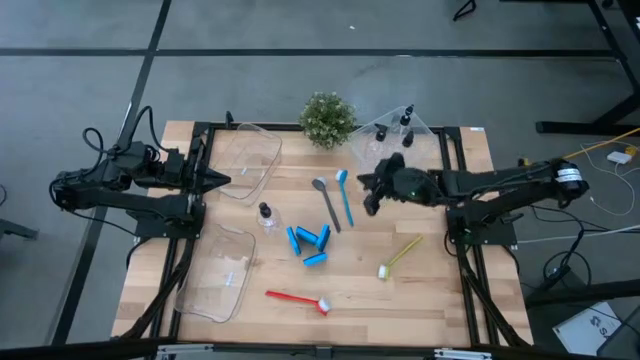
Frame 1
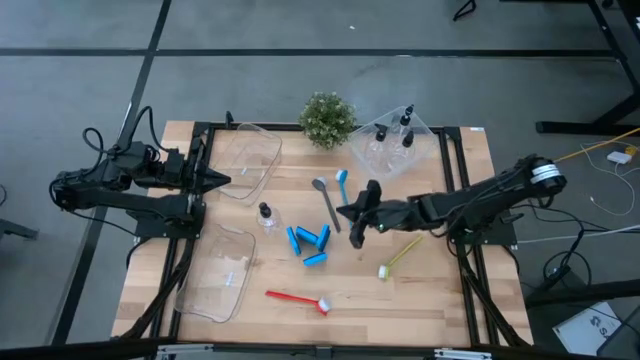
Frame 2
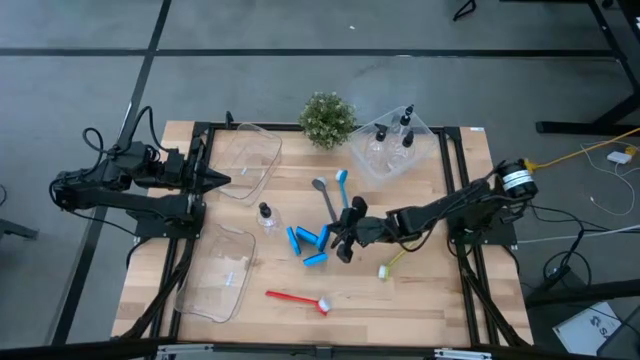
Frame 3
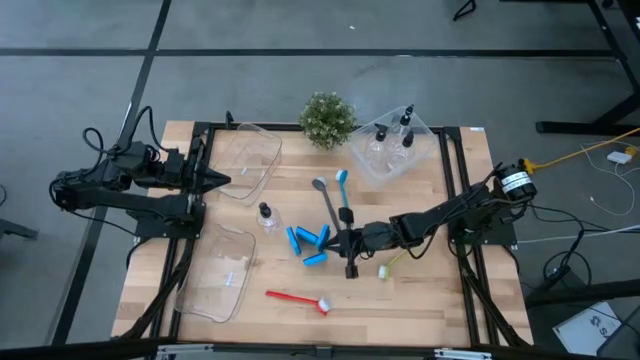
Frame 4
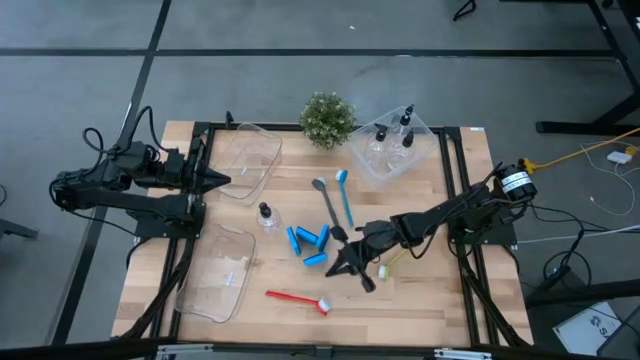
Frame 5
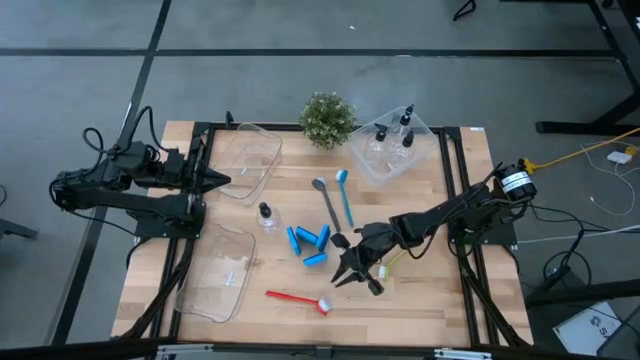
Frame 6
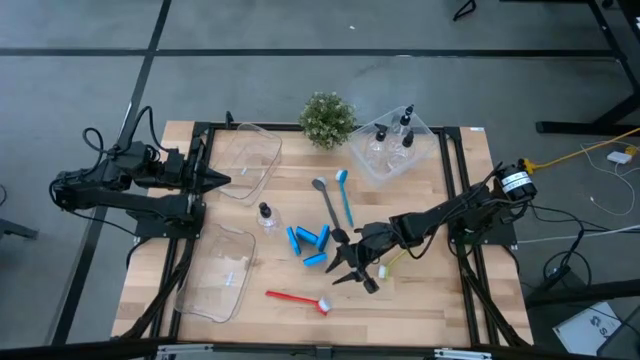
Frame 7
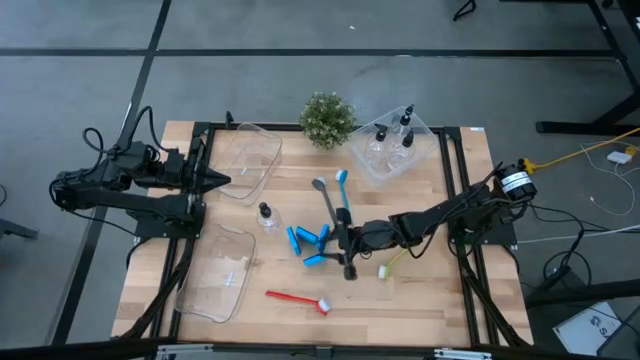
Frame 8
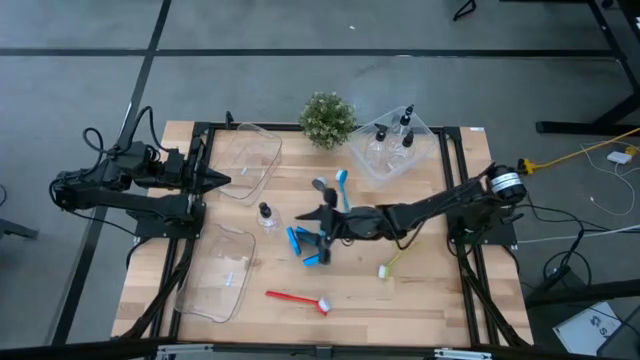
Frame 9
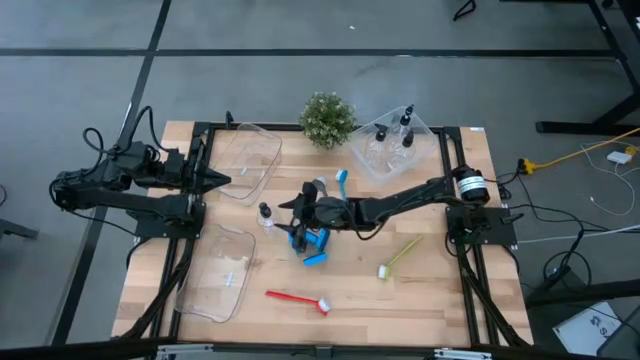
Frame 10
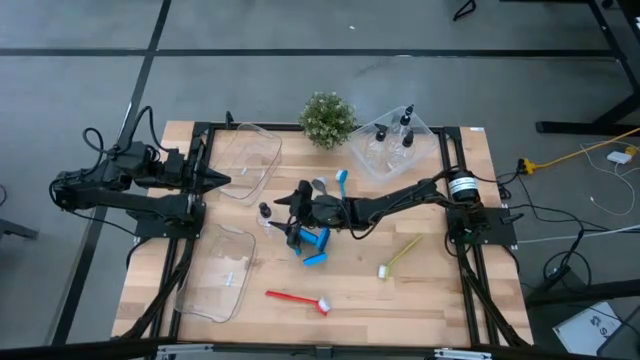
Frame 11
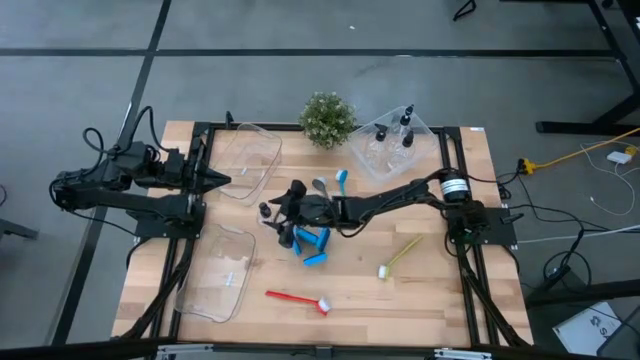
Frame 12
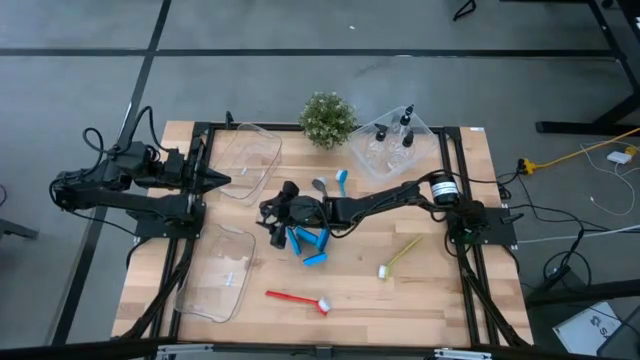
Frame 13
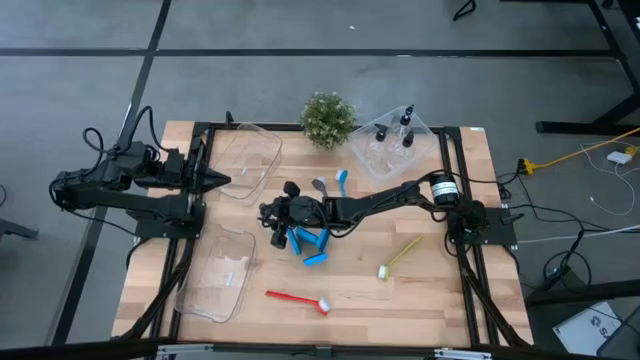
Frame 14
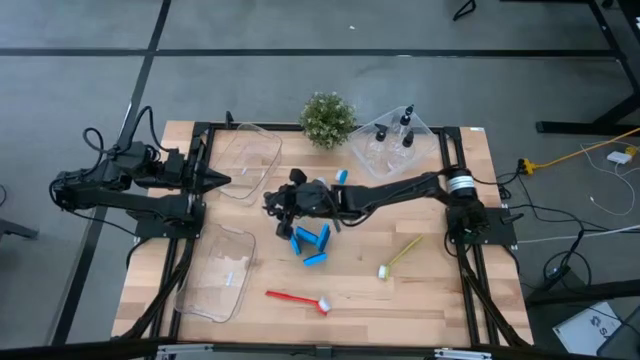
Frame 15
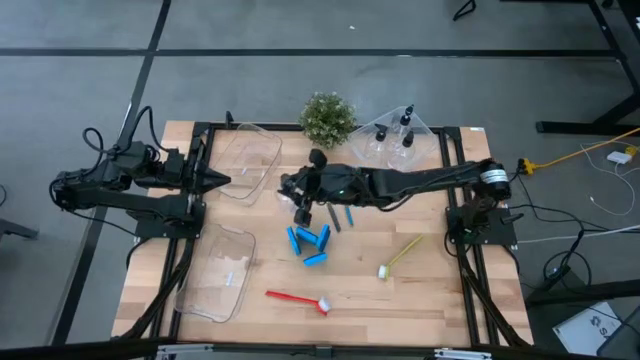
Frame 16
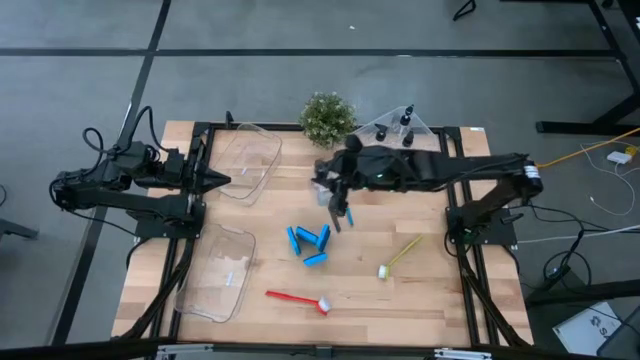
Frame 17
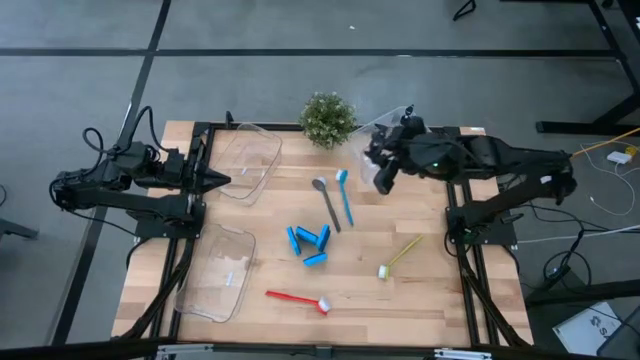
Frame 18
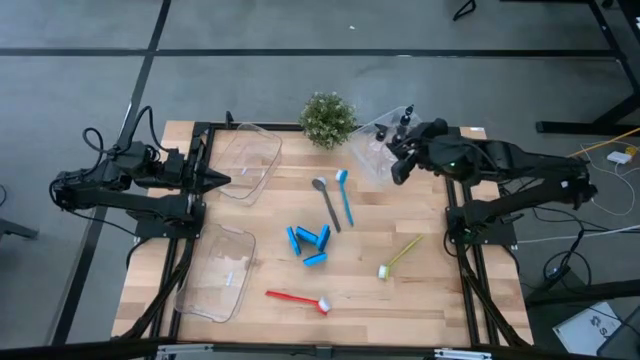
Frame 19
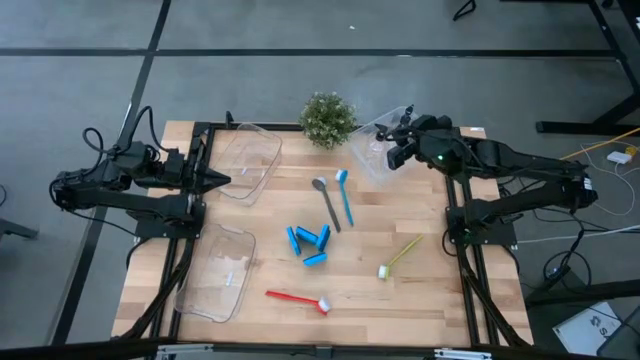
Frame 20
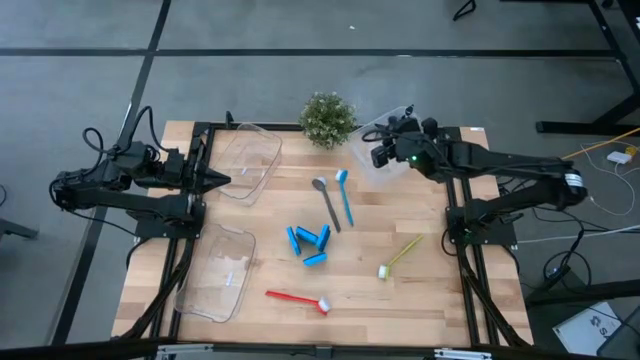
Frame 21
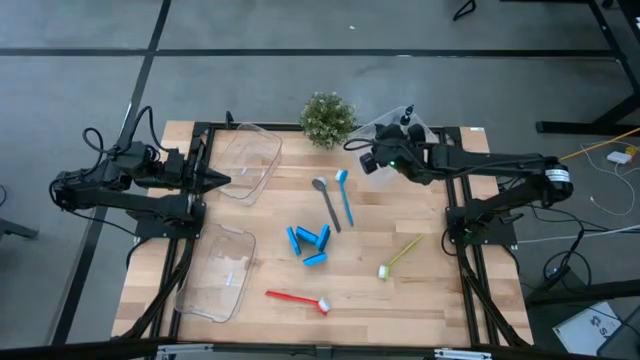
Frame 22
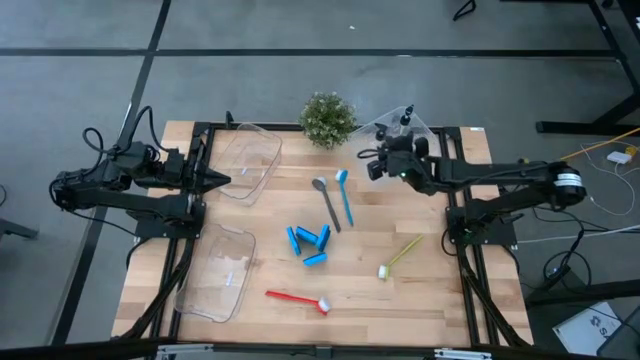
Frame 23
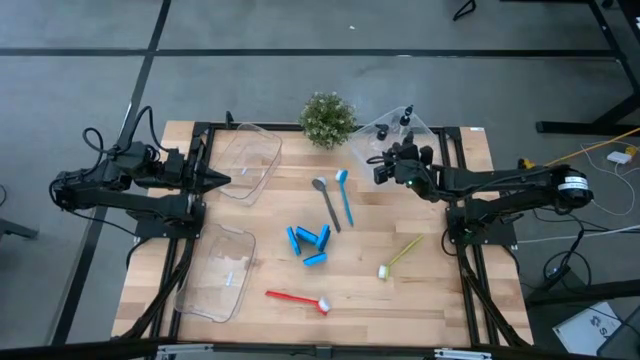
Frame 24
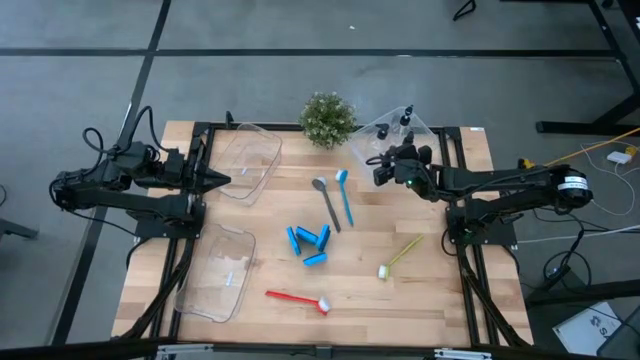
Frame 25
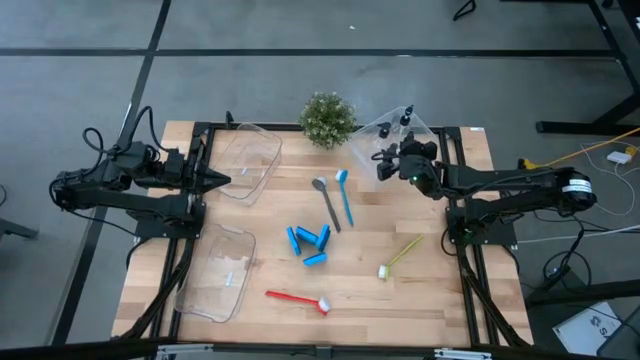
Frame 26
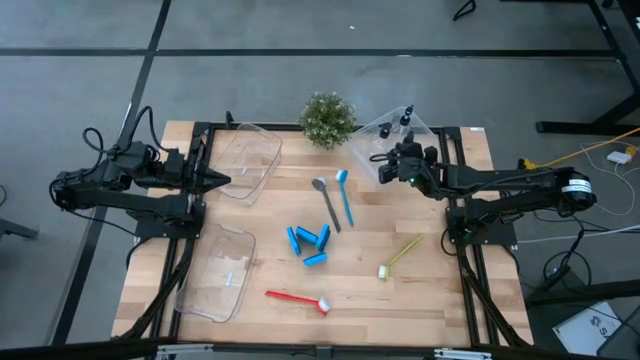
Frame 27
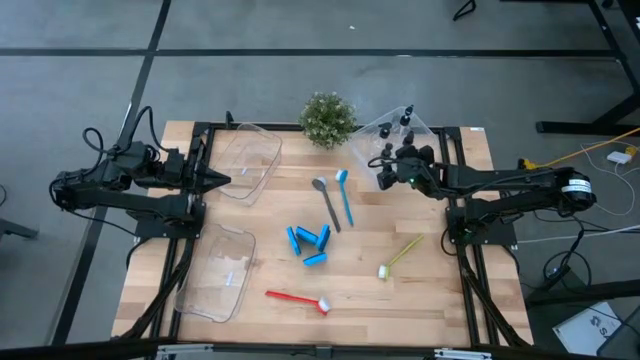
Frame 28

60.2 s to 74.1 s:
Task: Pick & Place Kitchen Sink Supplies
Put the soap dispenser into the white bin

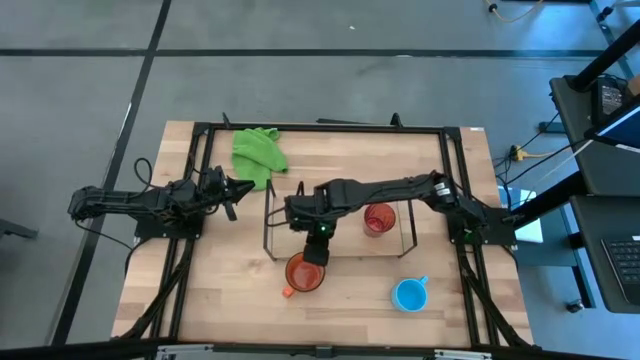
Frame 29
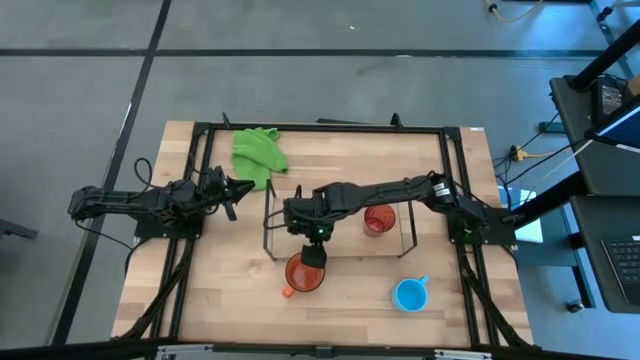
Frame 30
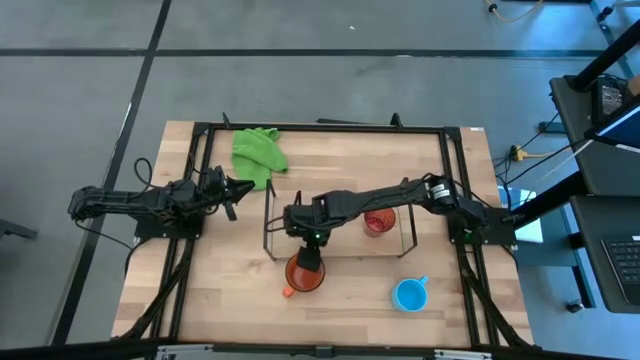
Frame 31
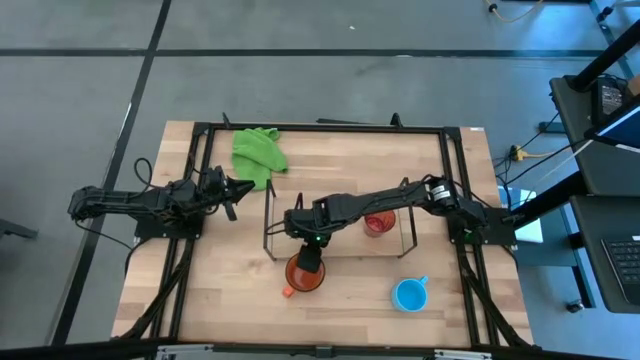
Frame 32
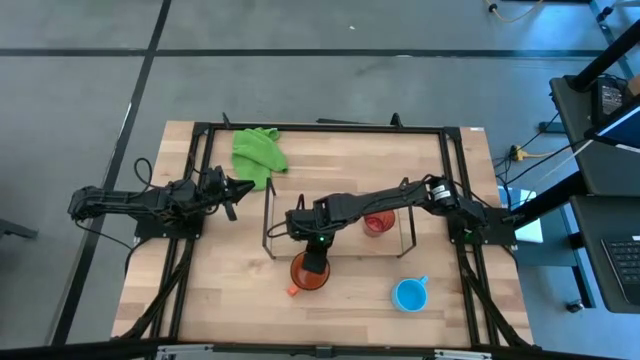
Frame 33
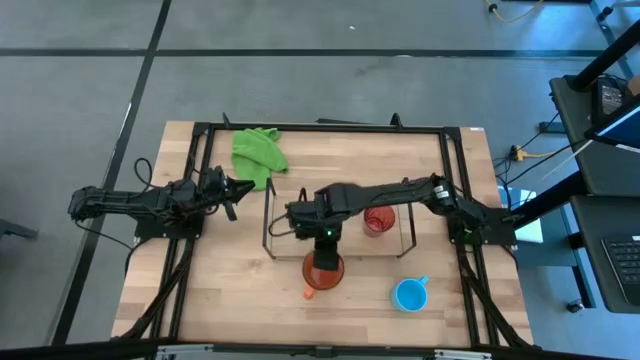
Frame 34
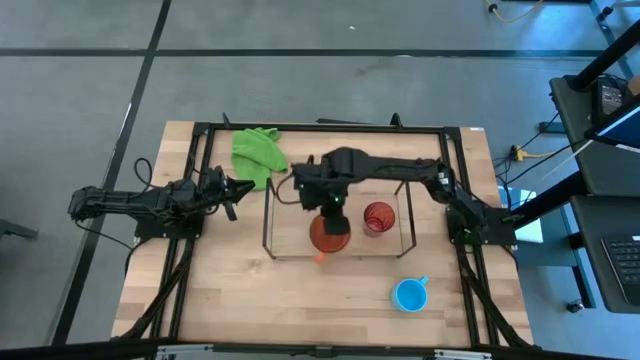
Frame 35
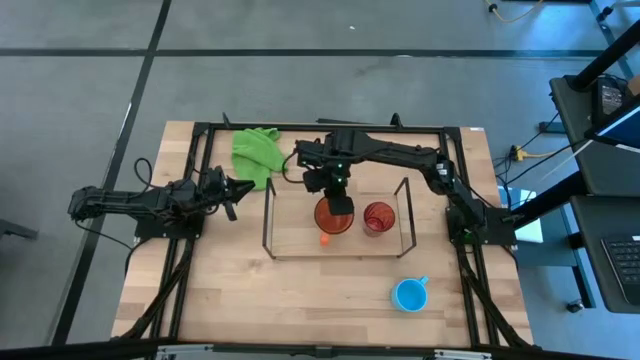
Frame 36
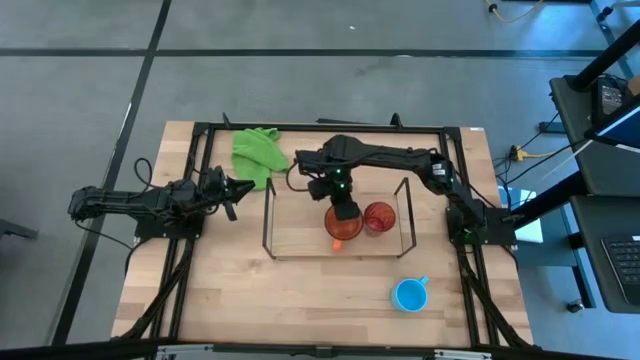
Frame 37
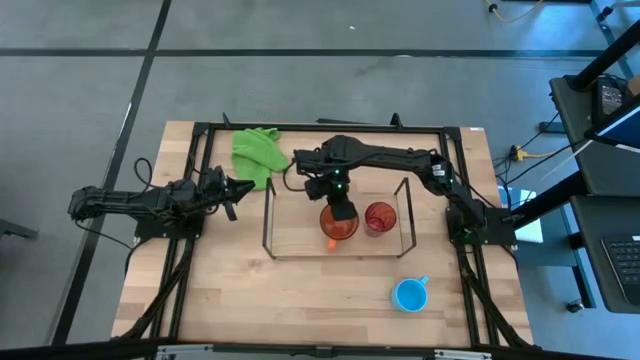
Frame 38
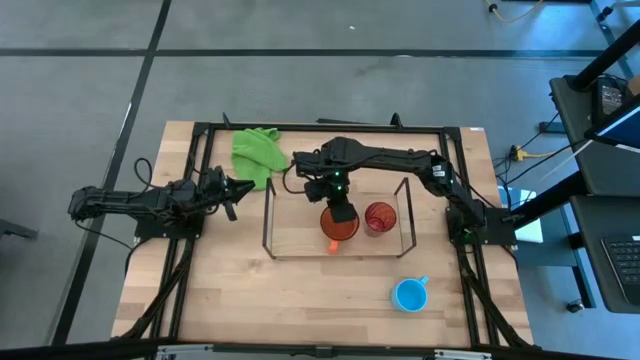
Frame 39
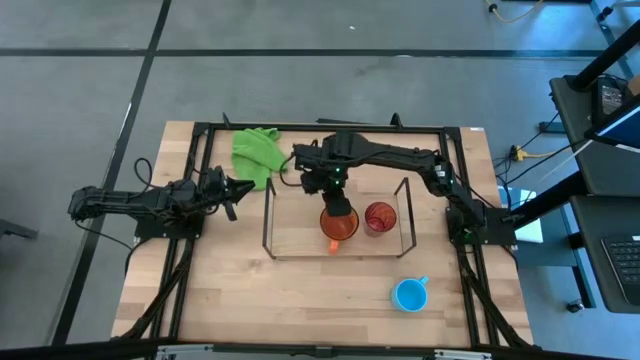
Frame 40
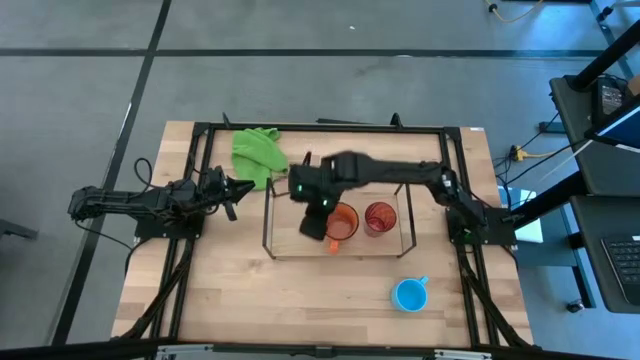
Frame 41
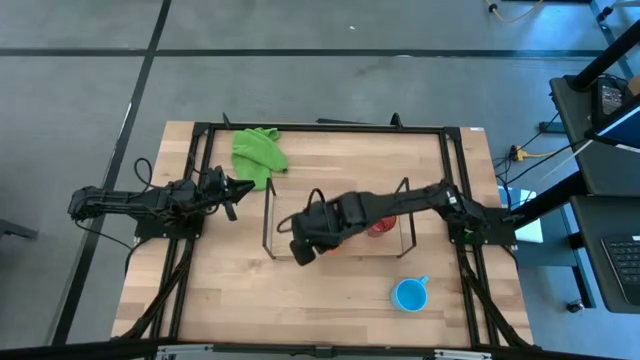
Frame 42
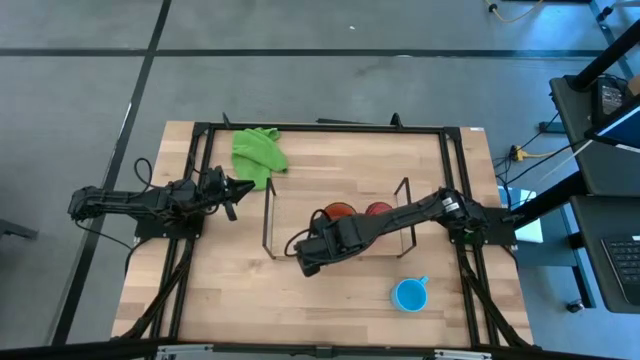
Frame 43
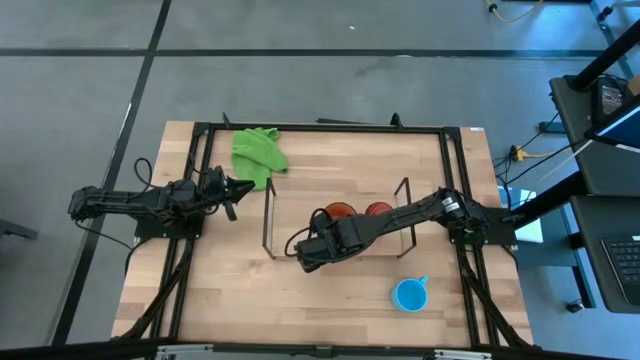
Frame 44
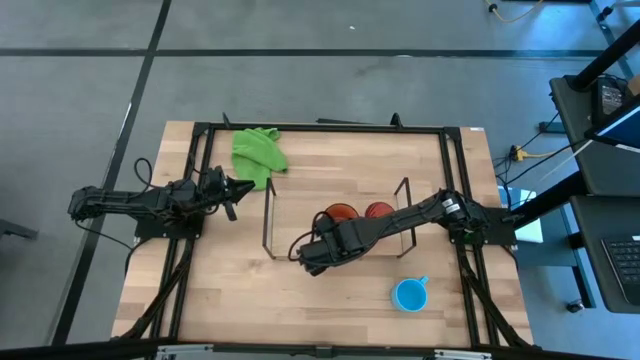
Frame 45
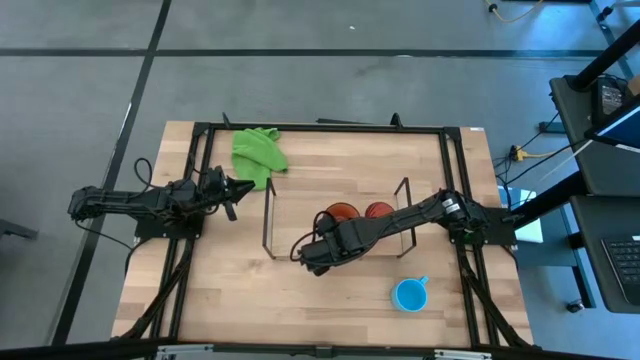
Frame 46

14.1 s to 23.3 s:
Task: Stack small to large cups/mugs on shelf
Put the orange mug on the shelf
